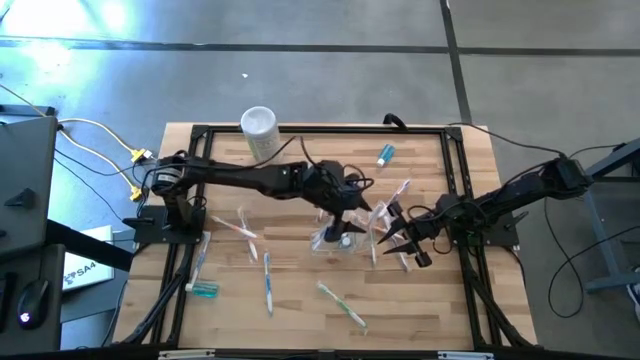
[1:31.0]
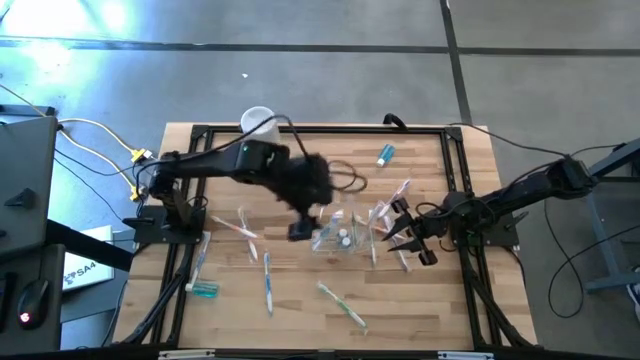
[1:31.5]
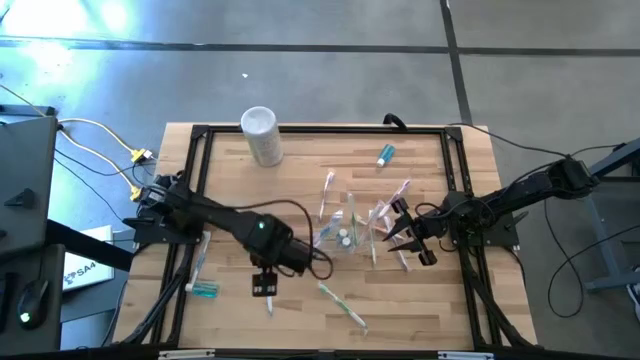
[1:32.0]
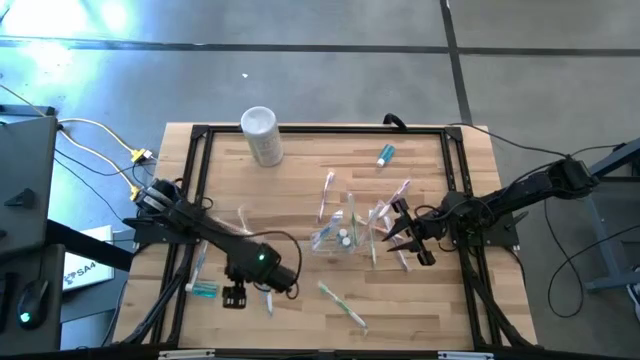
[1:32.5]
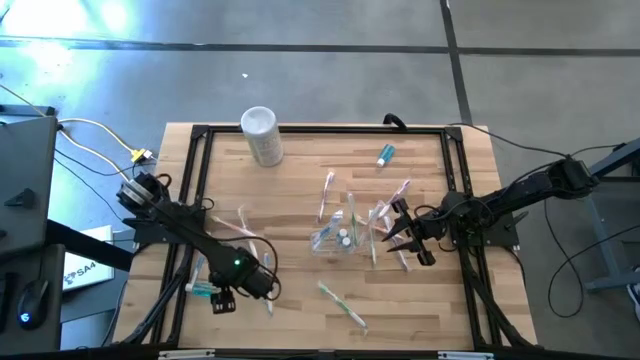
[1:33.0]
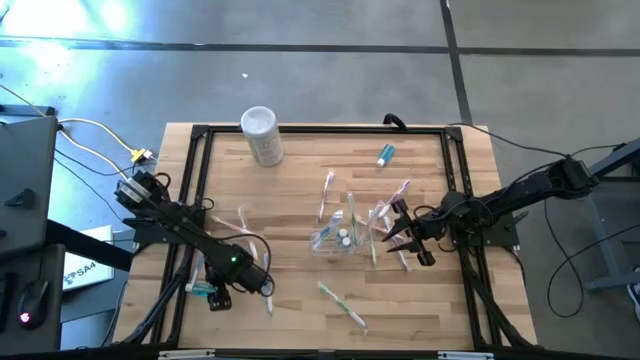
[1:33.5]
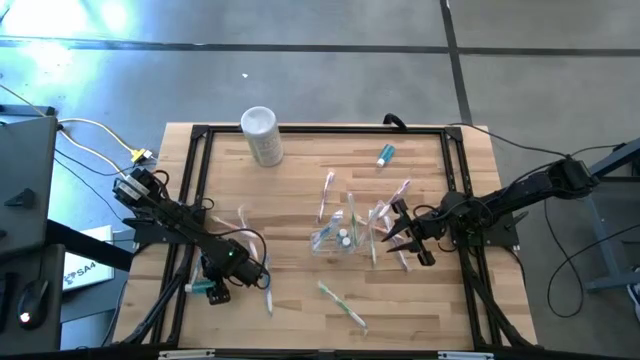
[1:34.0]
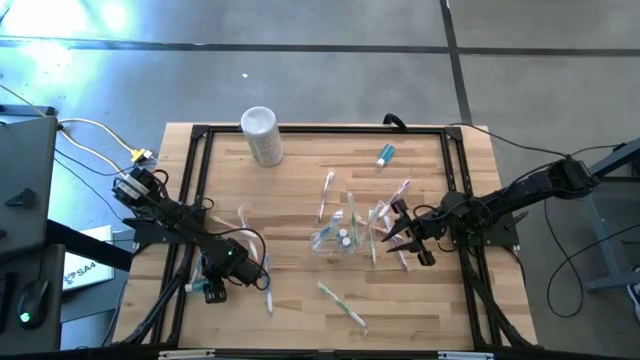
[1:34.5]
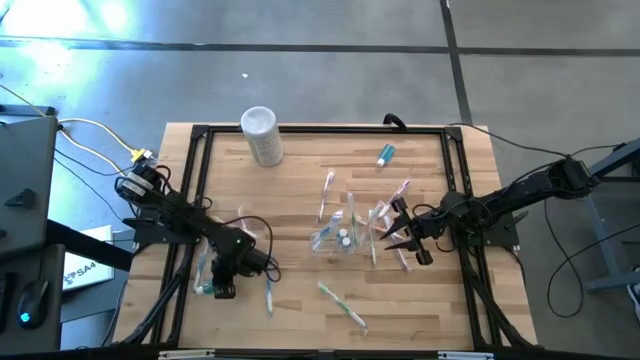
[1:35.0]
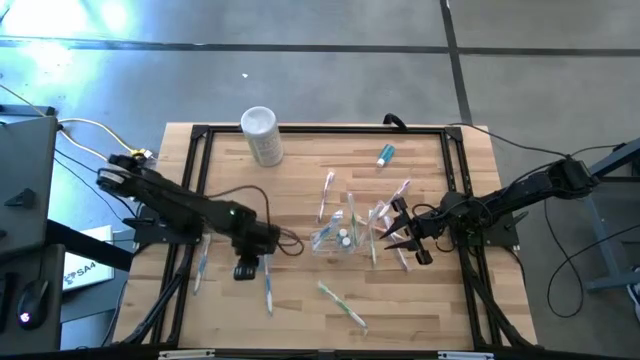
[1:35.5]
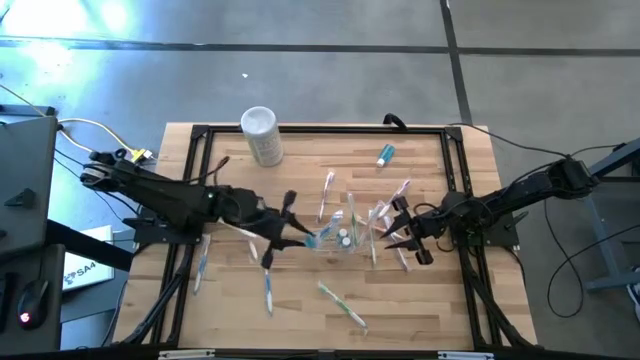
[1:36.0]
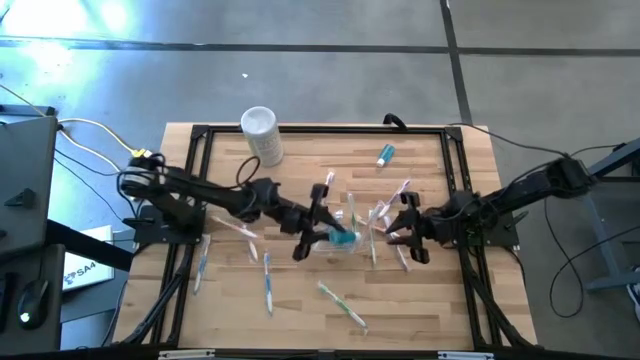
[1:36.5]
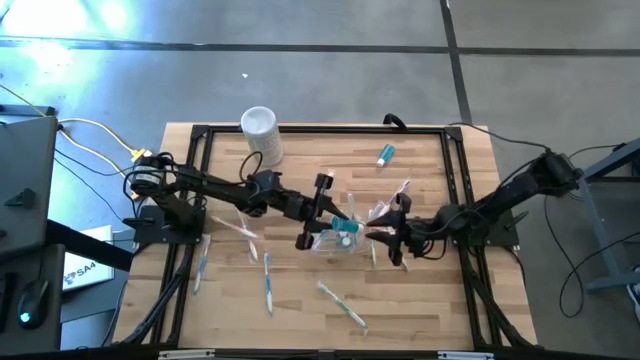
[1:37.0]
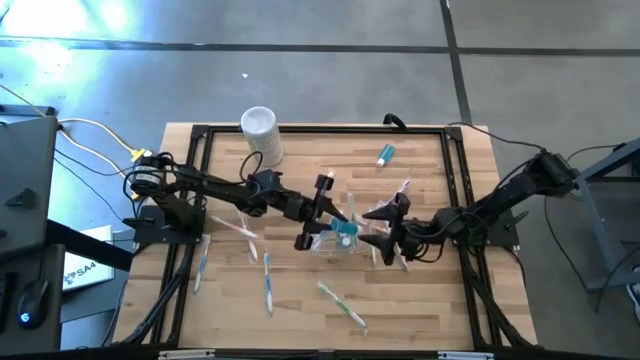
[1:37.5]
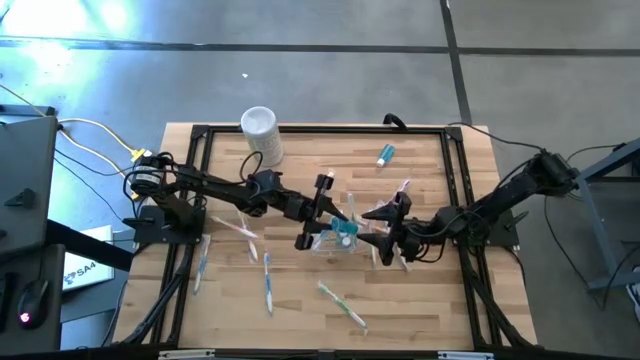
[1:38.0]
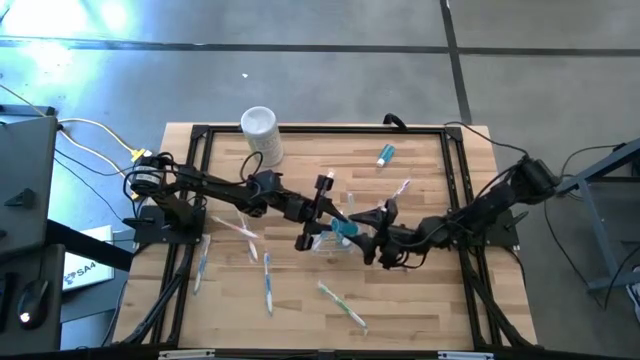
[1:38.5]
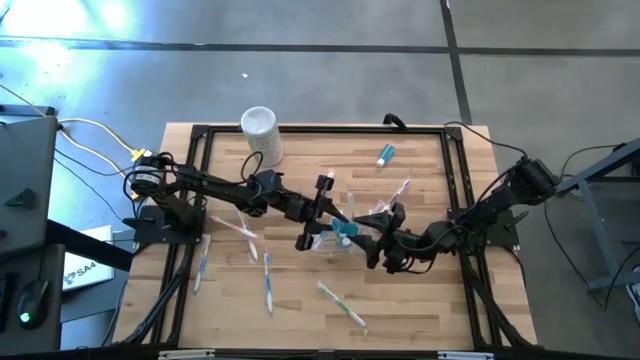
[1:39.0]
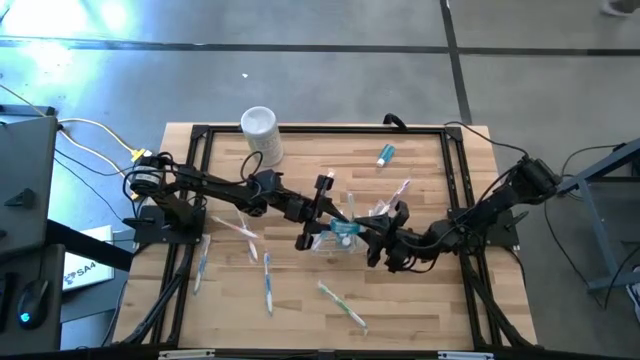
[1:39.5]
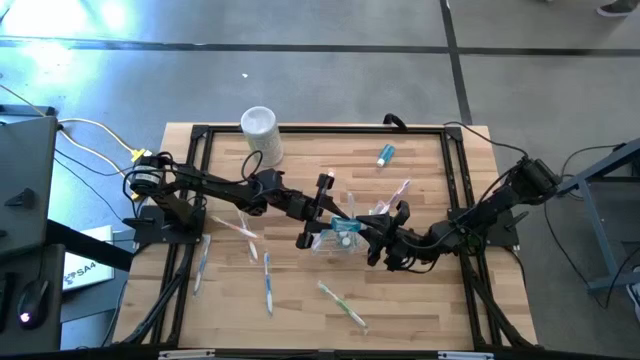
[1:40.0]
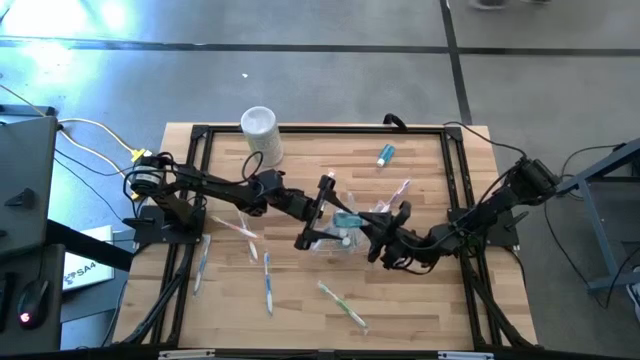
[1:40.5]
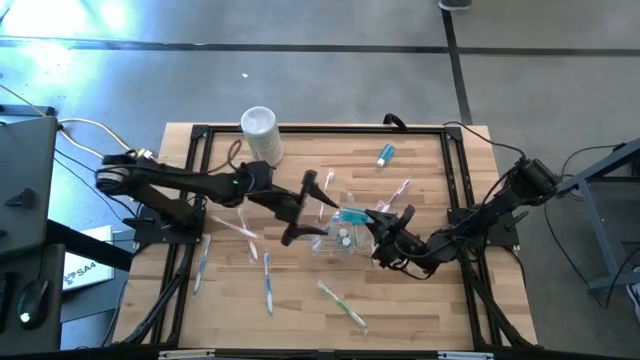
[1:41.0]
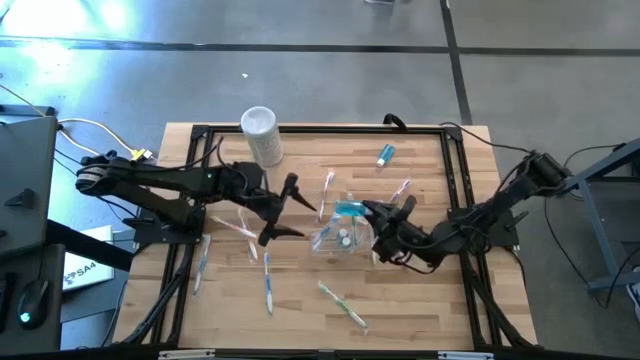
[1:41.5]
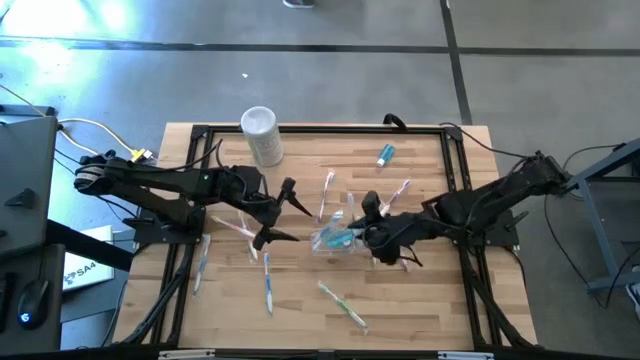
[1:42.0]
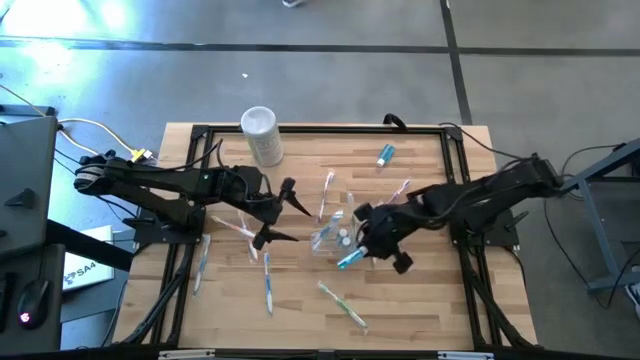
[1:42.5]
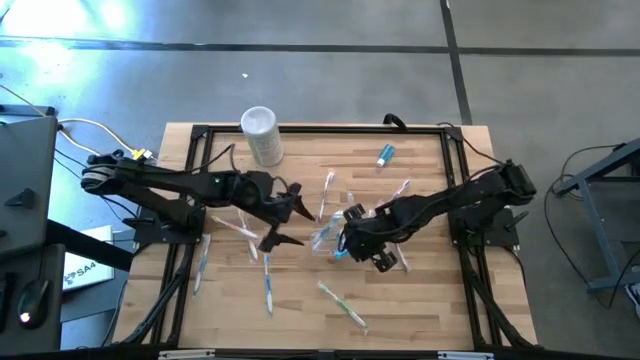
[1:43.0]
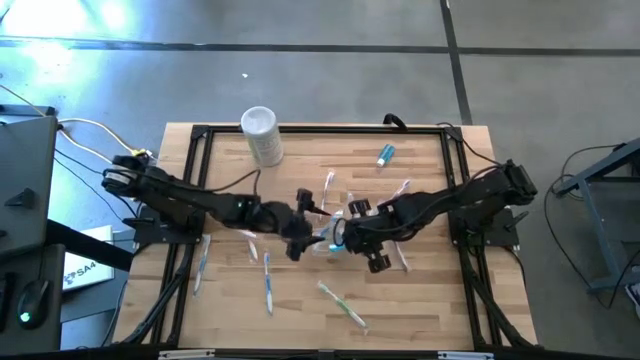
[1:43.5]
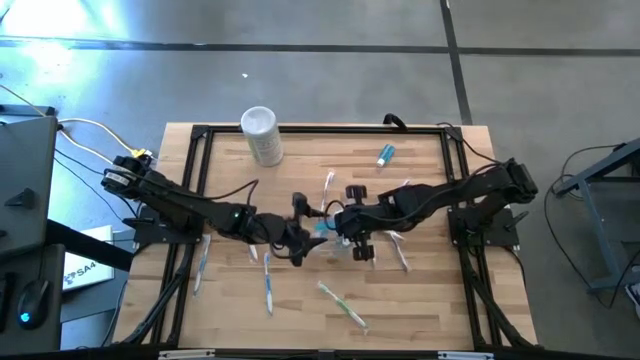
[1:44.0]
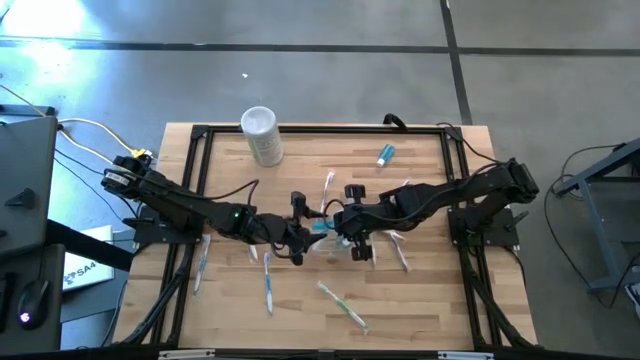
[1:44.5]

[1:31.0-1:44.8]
Task: Pick & Place toothbrushing station
Put the blue mouthwash into the middle section of the transparent organizer

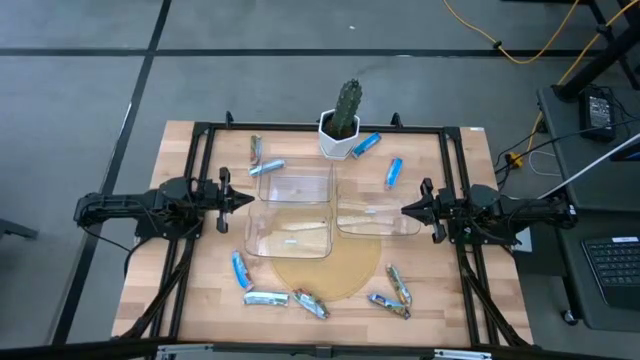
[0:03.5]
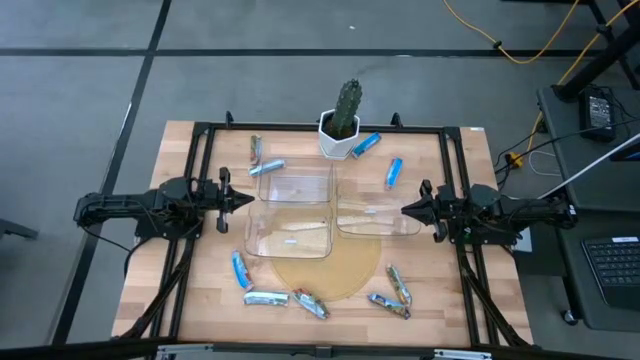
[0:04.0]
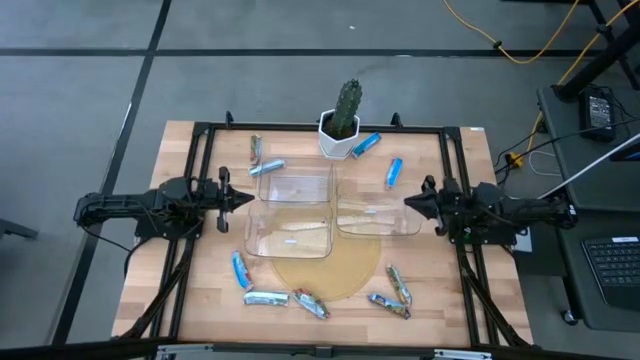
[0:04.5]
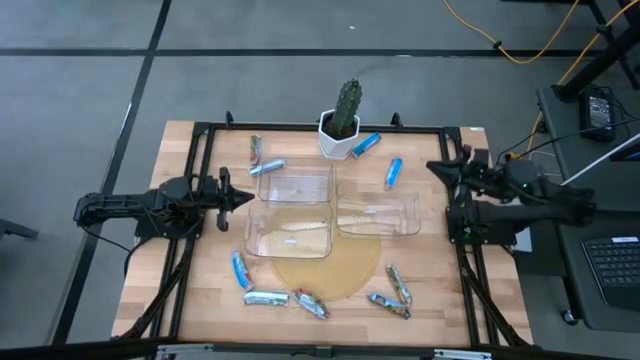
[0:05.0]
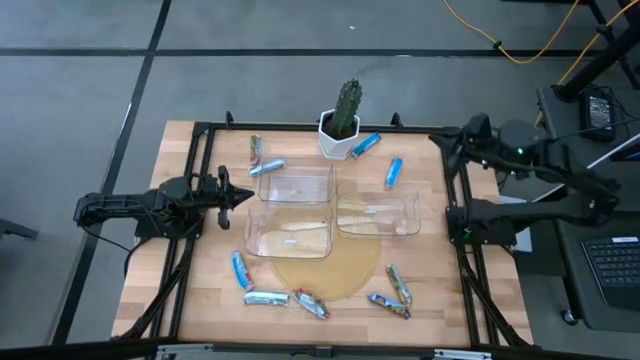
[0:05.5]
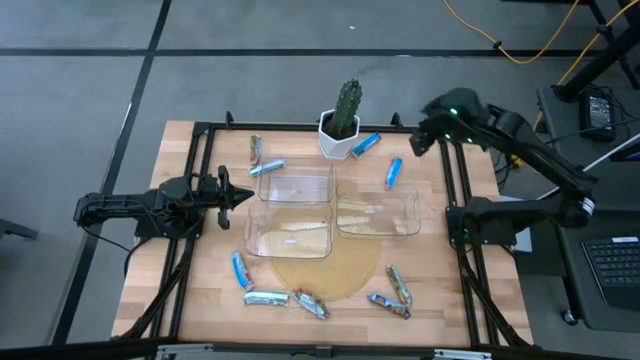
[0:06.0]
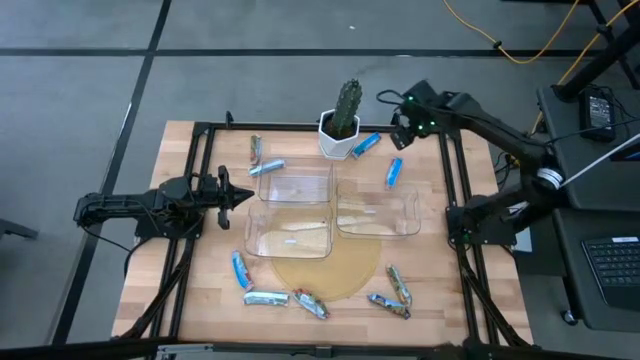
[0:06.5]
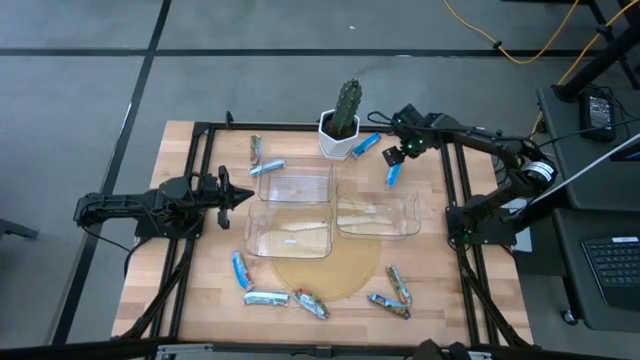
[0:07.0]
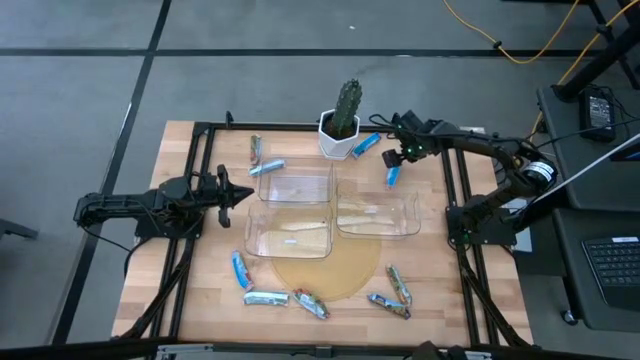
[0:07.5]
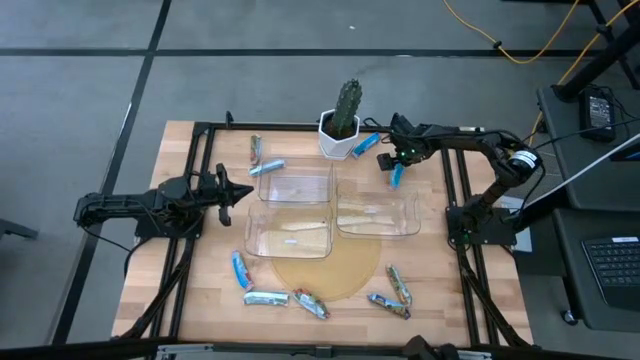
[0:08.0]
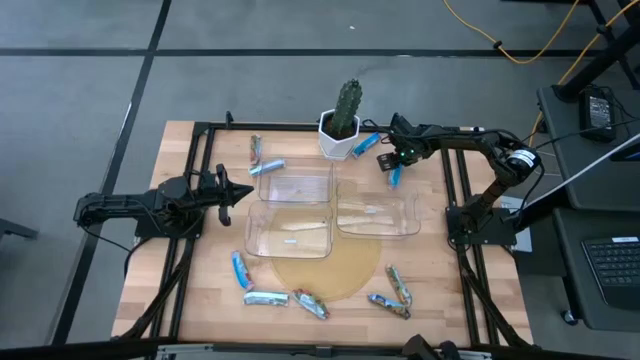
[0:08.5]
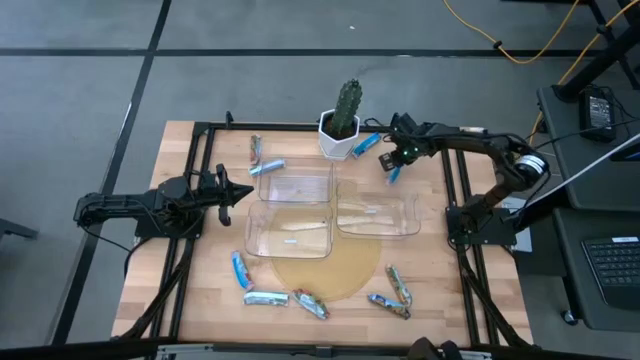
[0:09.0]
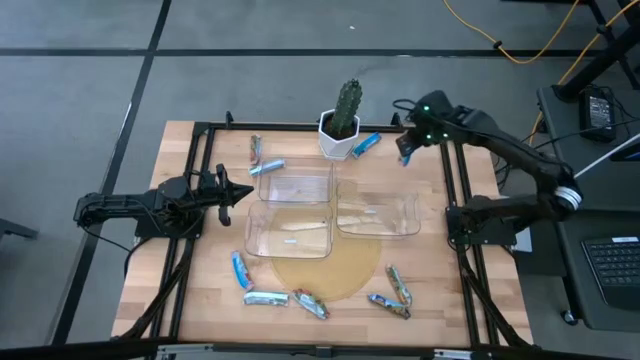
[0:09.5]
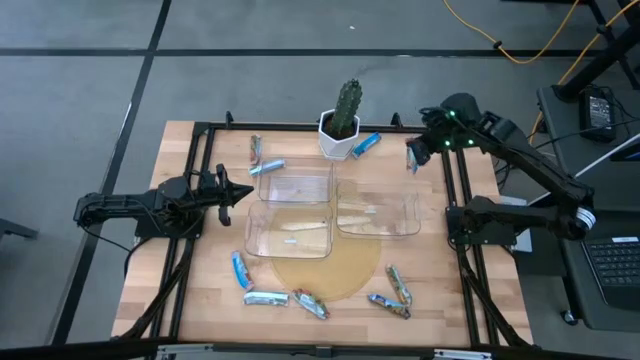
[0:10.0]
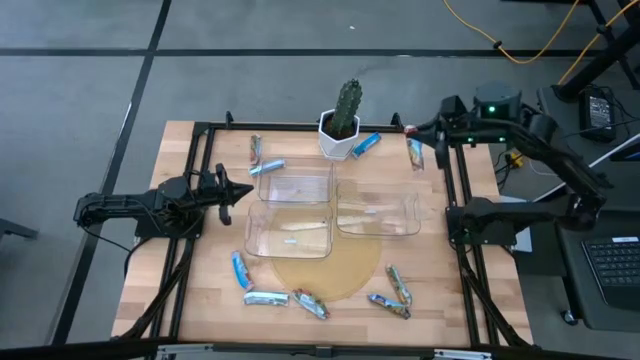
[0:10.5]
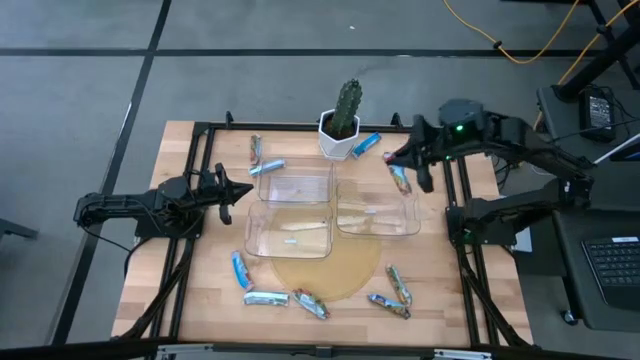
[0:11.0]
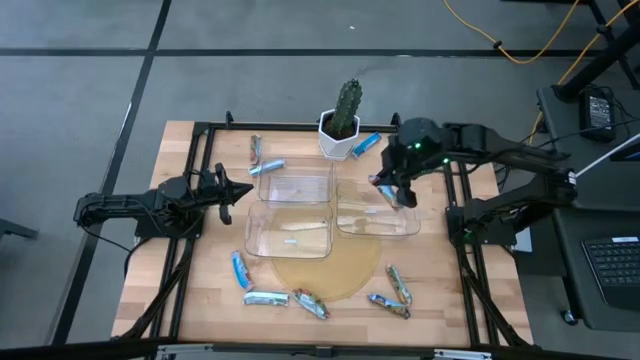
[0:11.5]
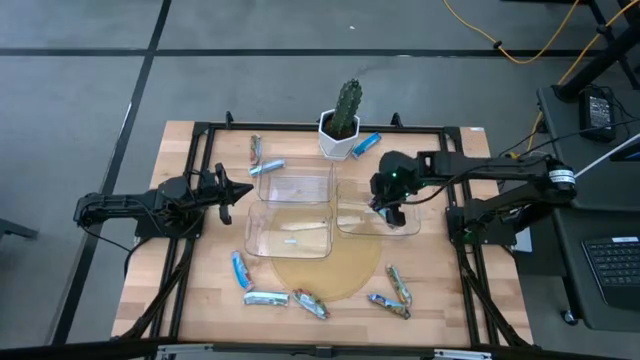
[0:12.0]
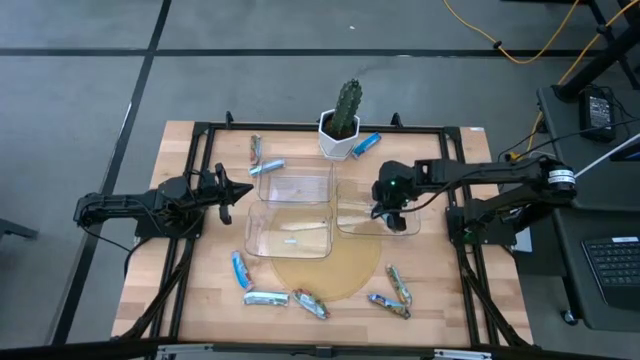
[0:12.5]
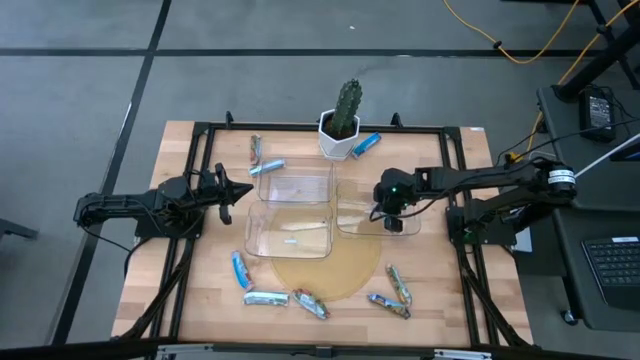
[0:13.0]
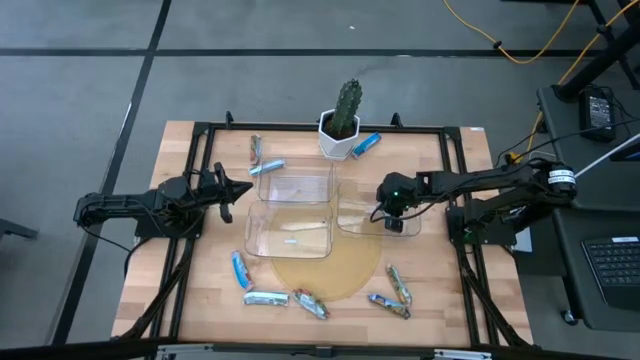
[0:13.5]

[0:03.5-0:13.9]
Task: Pick and place Granola Bars by type
Put the red granola bar into the right bin
